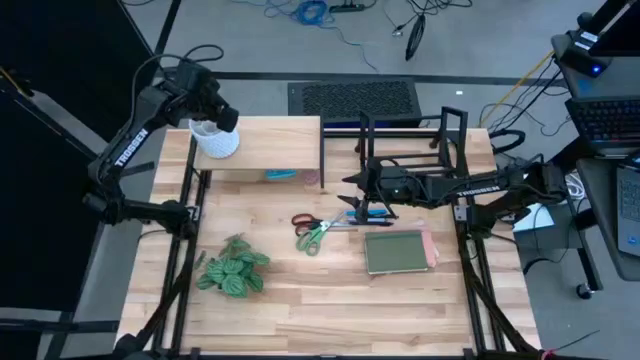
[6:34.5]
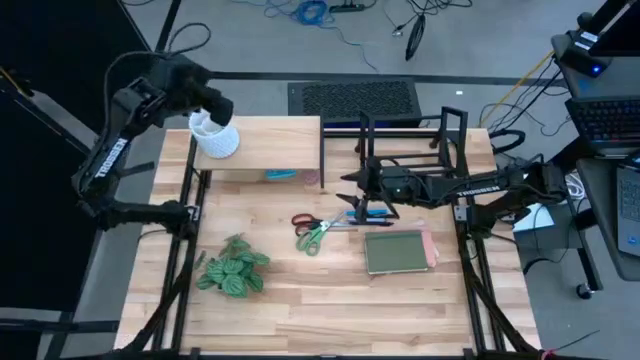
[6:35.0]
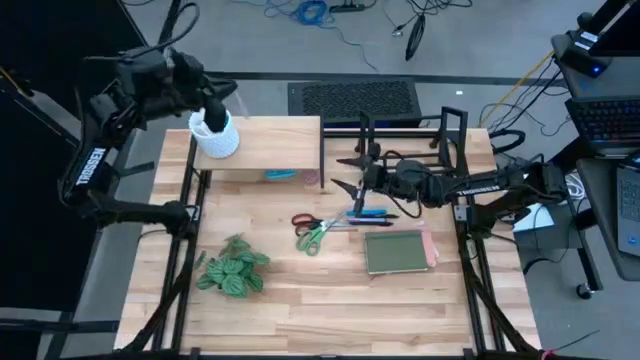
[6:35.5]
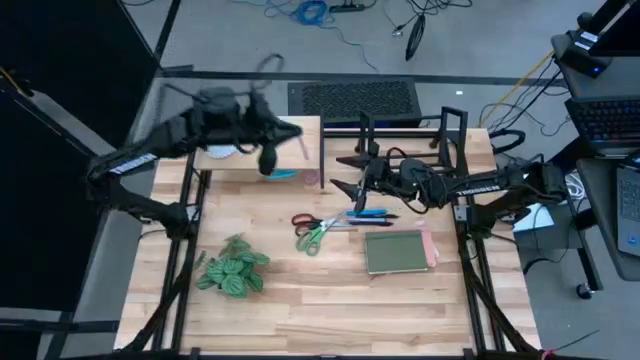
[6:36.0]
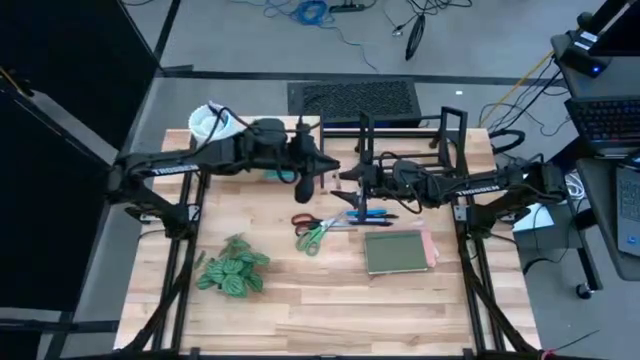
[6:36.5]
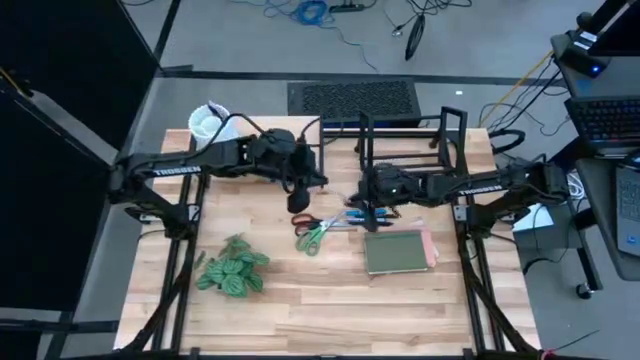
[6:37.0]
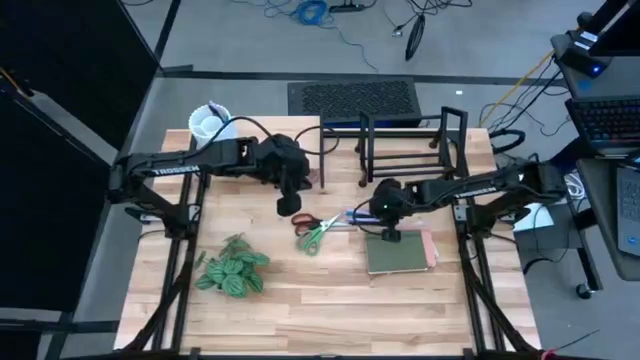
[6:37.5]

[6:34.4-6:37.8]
Task: Stock shelves
Remove the pink pen from the white pen holder

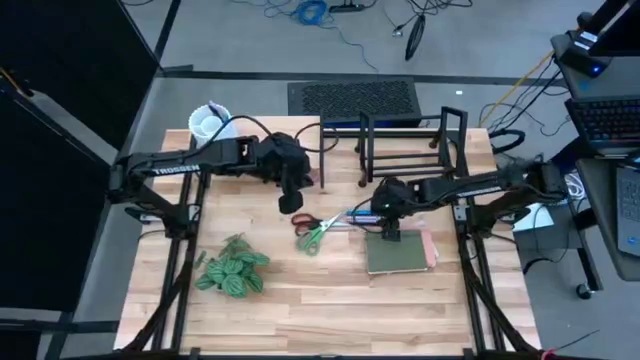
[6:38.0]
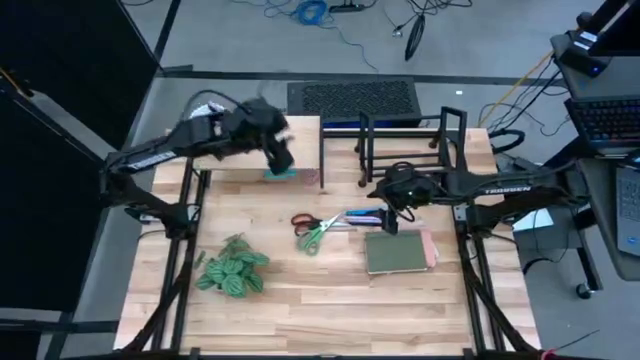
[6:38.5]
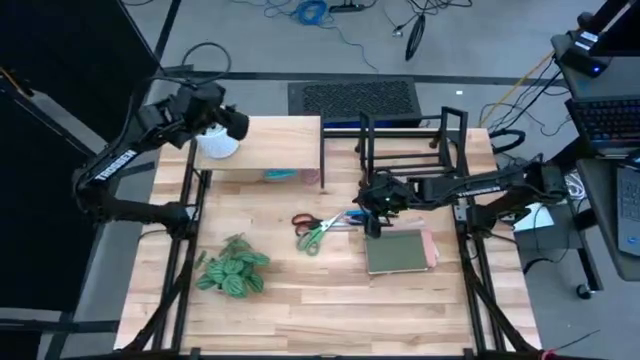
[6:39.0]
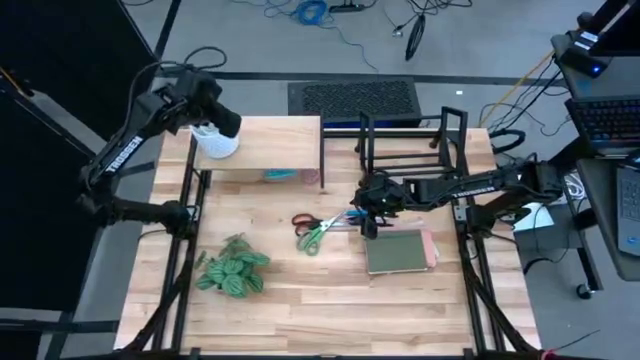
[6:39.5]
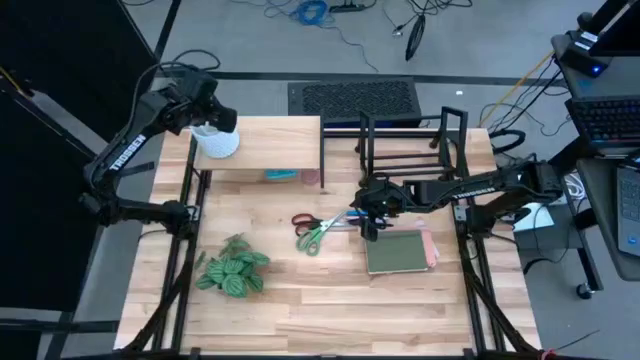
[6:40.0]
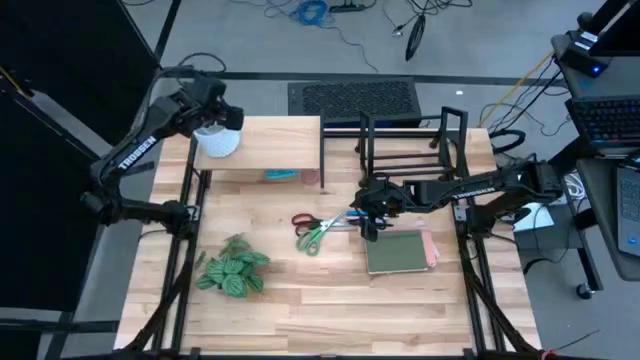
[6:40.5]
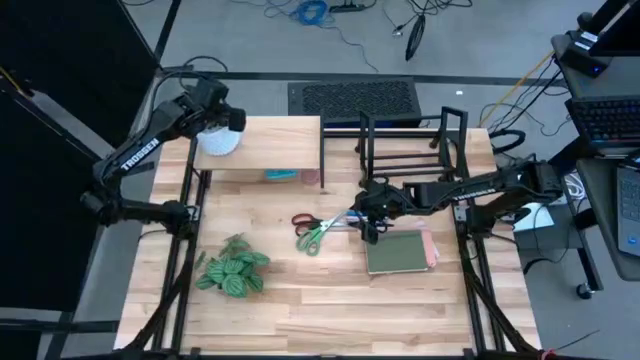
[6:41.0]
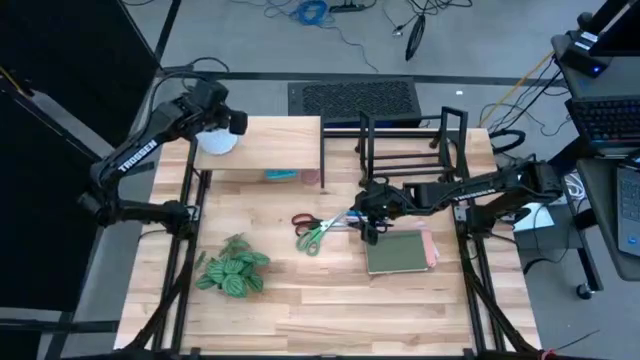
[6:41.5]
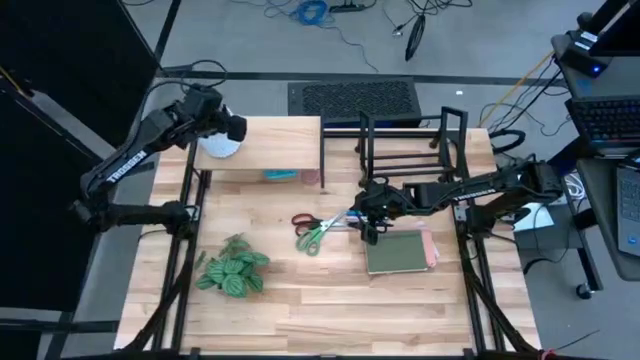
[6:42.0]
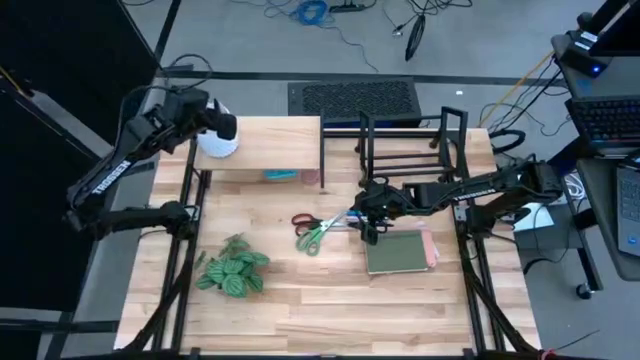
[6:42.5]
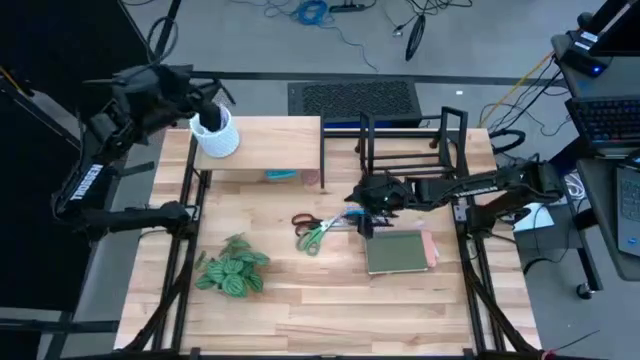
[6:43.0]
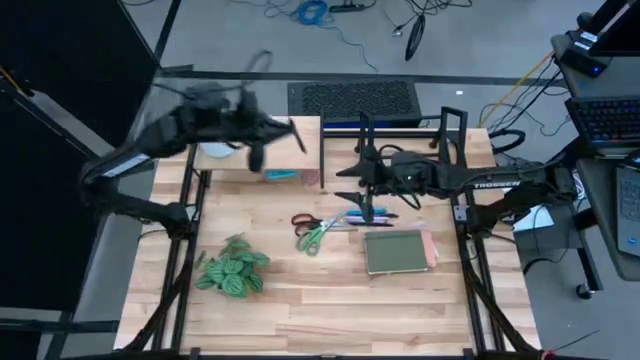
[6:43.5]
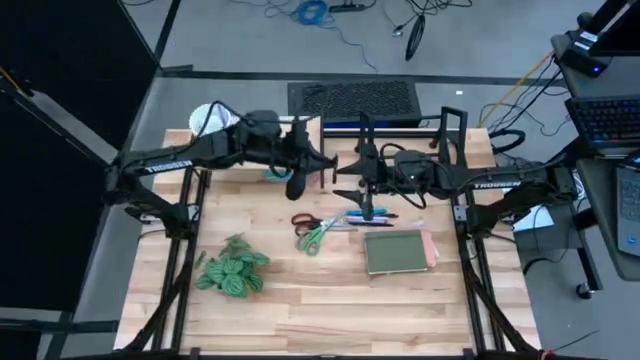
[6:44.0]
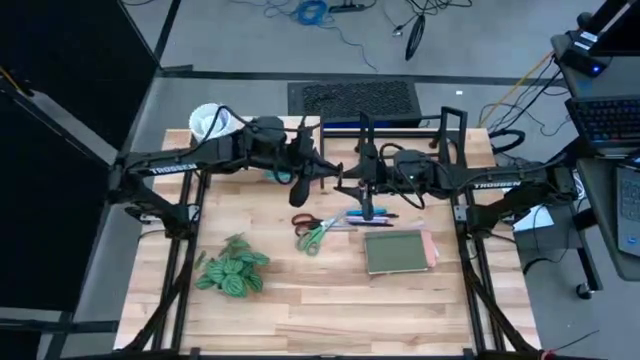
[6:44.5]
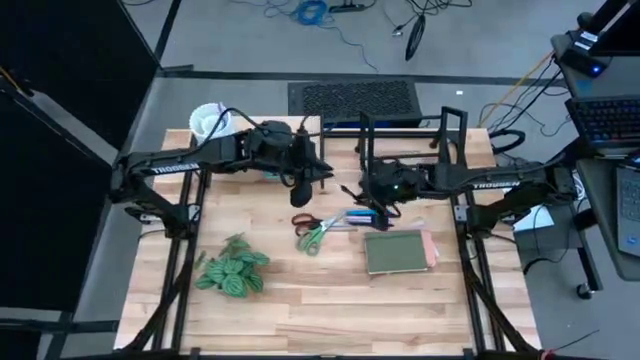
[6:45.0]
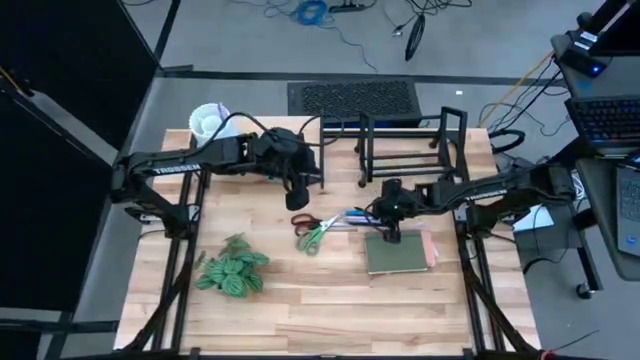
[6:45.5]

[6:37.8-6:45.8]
Remove the black pen from the white pen holder

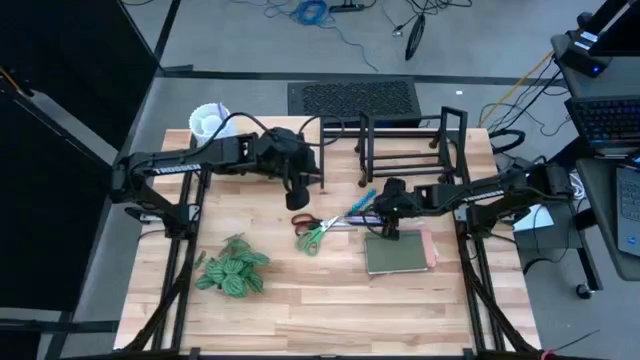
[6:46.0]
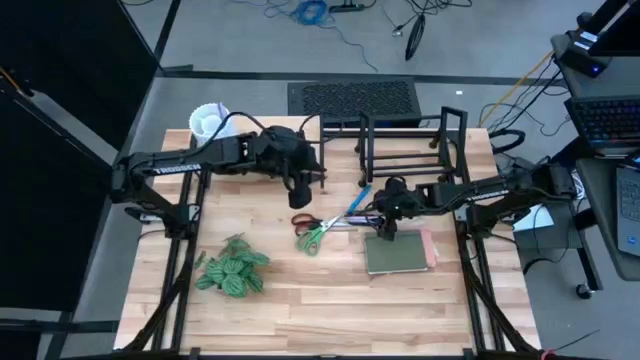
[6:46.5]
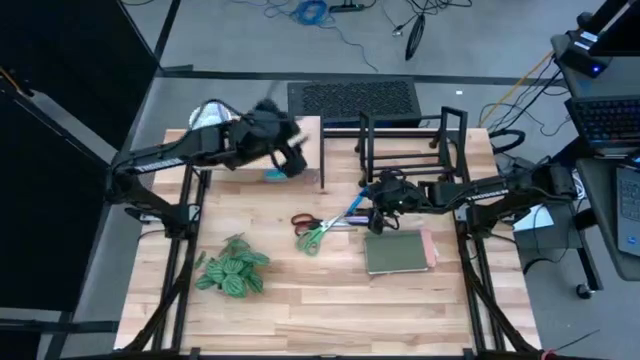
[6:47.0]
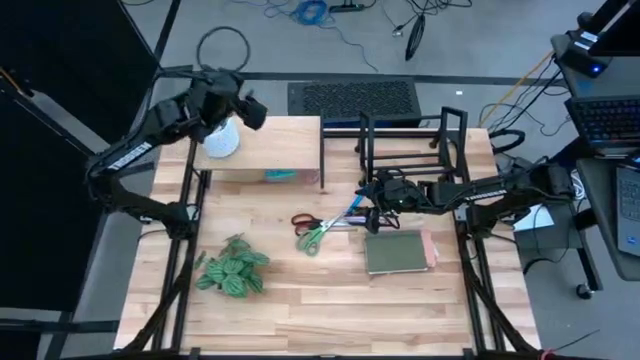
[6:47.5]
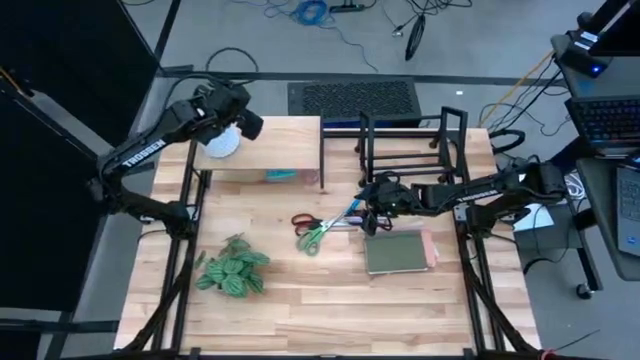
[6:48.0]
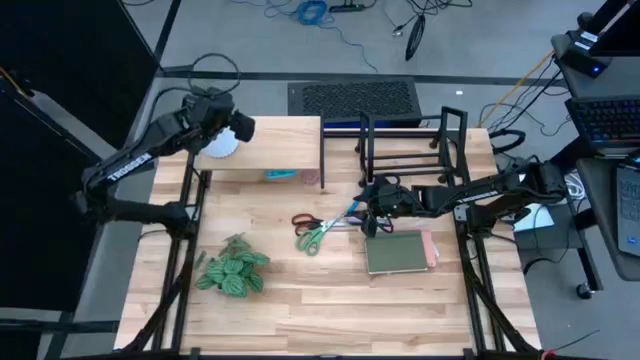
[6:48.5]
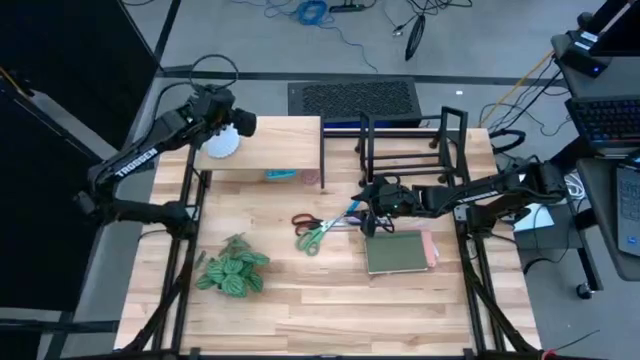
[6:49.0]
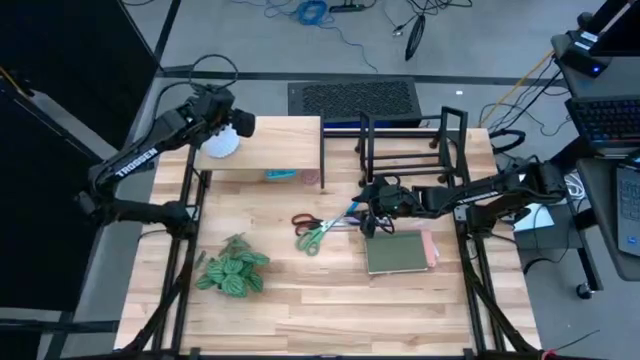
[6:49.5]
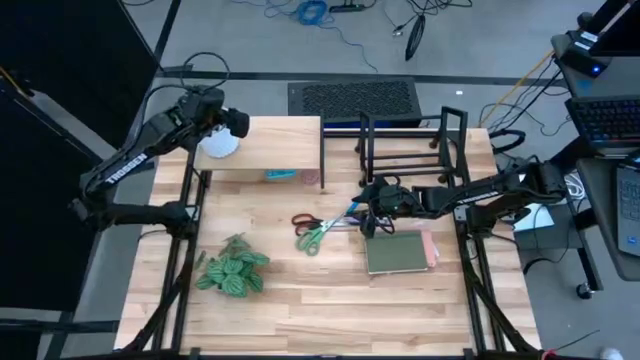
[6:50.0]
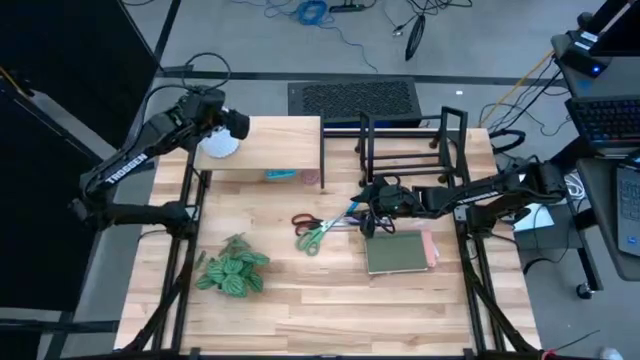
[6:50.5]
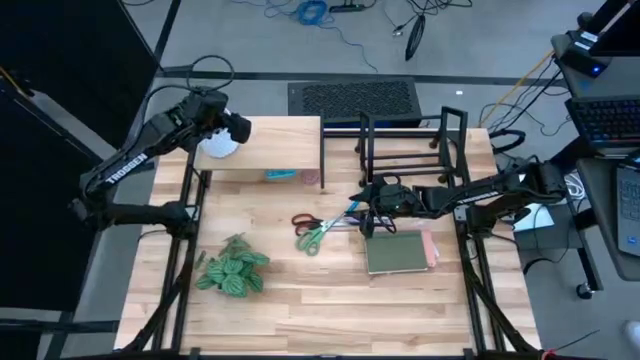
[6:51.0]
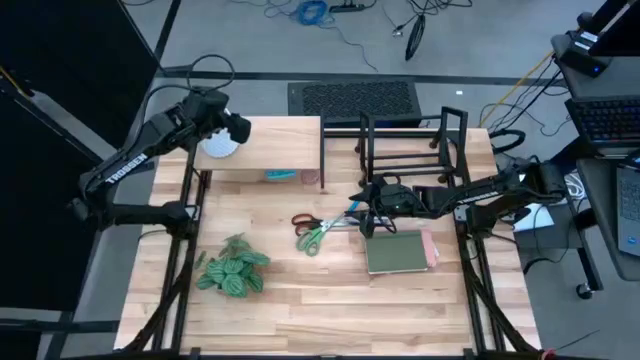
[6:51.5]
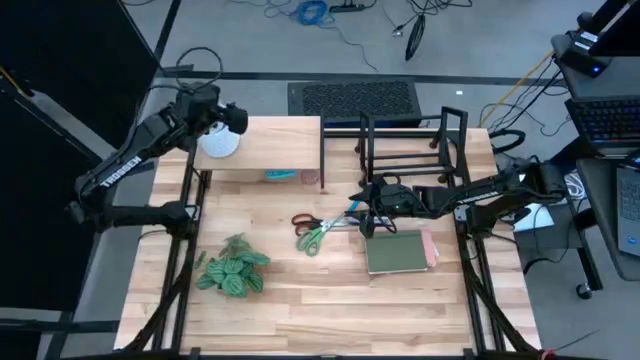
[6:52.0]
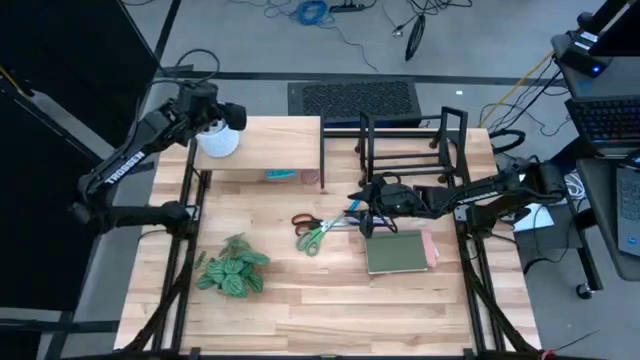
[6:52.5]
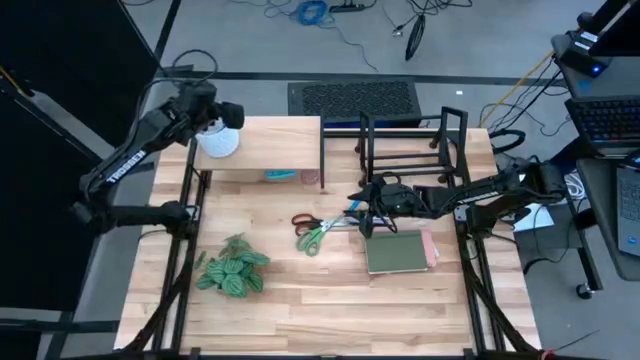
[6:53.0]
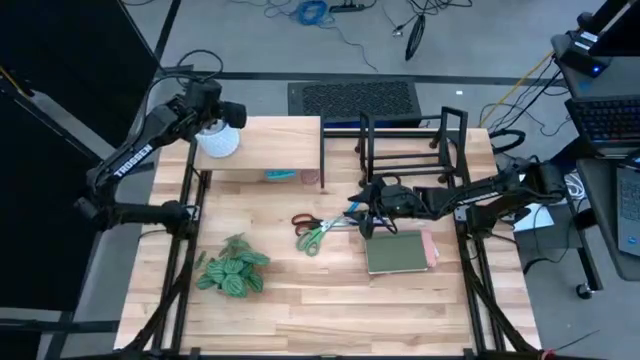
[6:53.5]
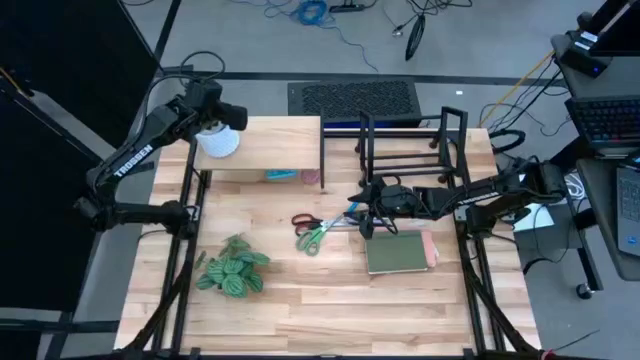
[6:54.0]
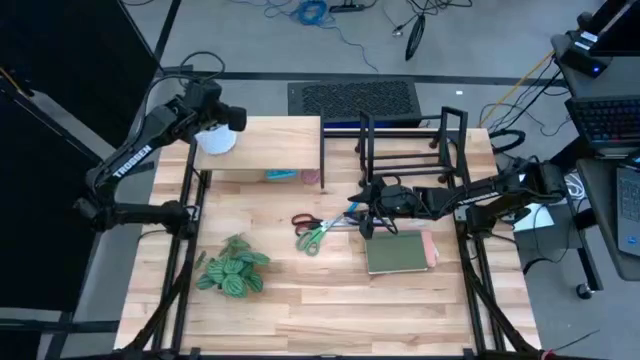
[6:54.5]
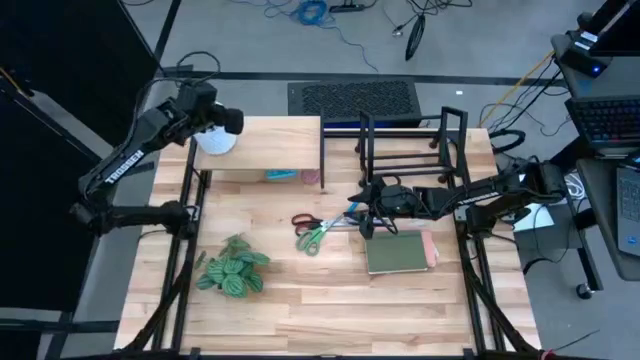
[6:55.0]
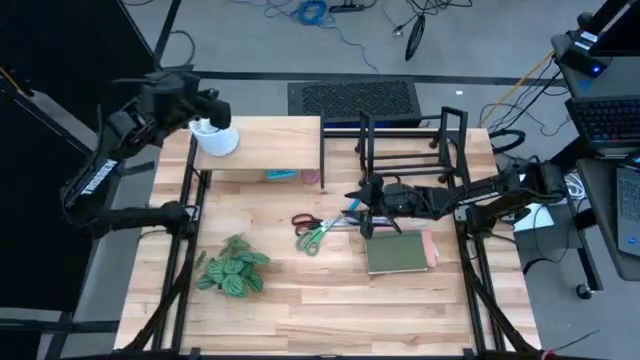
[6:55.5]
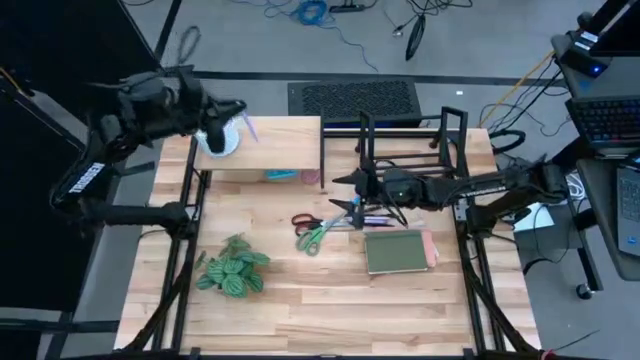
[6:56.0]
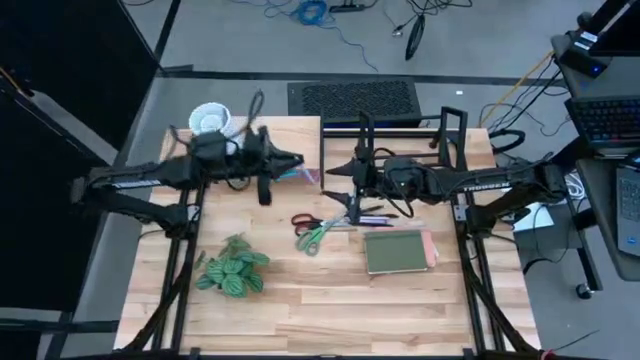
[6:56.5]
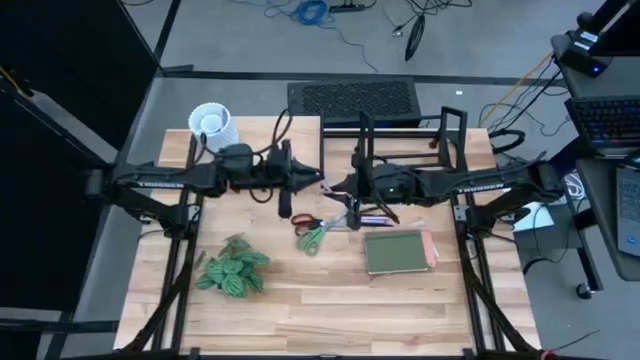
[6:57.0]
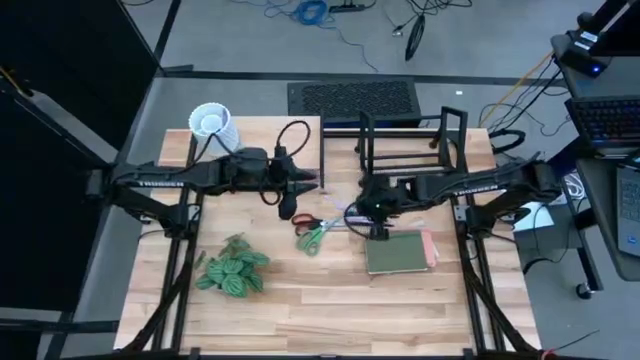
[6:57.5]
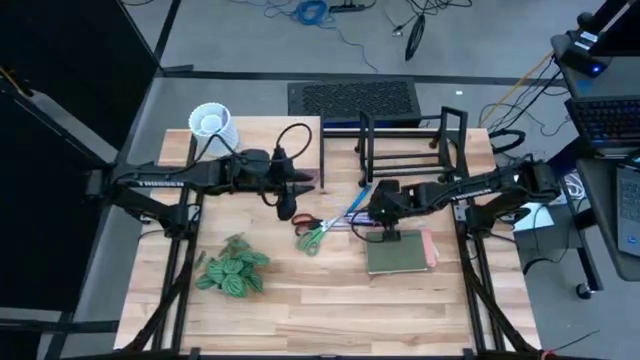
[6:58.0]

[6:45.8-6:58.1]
Remove the purple pen from the white pen holder
